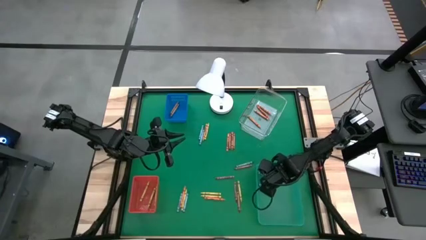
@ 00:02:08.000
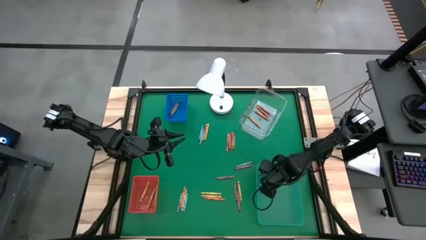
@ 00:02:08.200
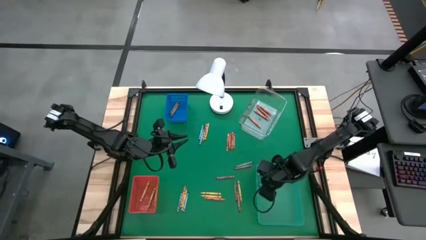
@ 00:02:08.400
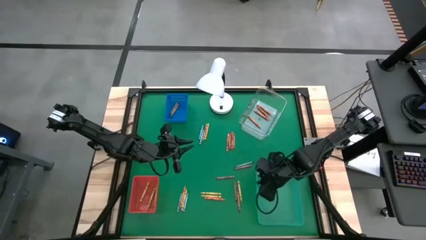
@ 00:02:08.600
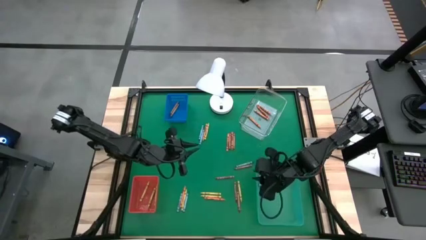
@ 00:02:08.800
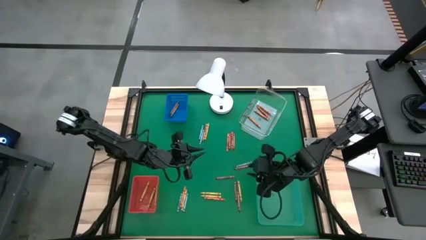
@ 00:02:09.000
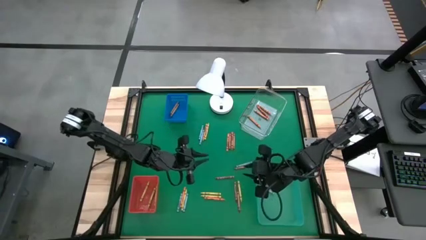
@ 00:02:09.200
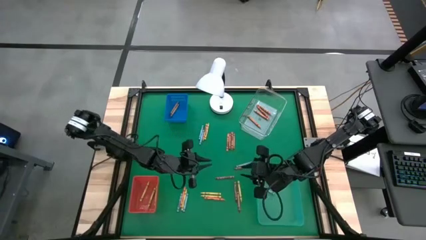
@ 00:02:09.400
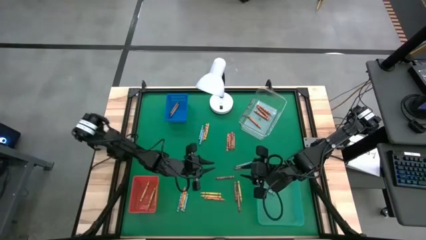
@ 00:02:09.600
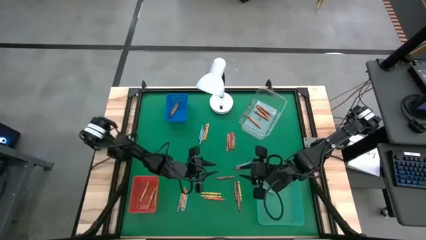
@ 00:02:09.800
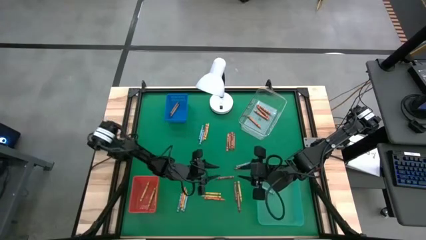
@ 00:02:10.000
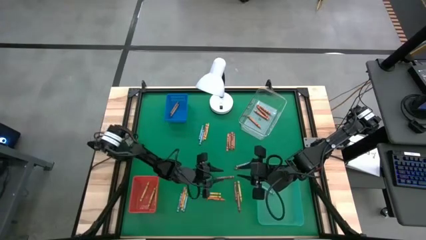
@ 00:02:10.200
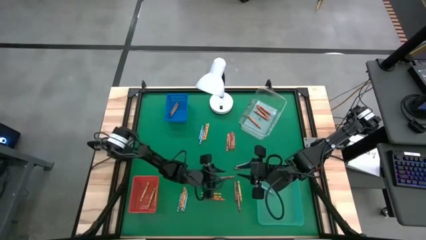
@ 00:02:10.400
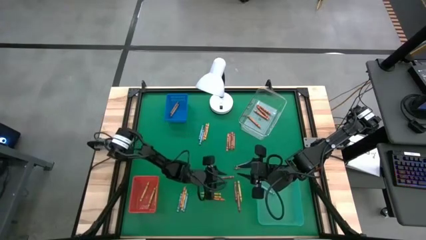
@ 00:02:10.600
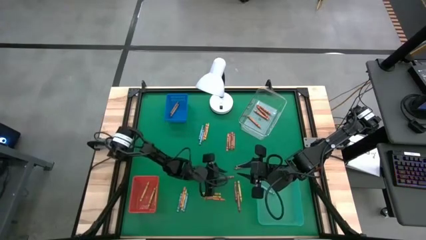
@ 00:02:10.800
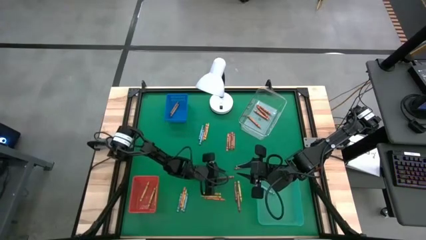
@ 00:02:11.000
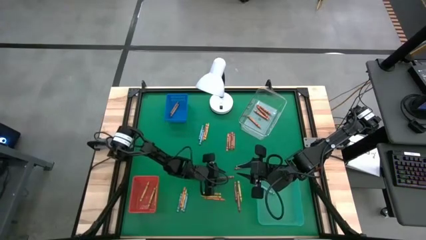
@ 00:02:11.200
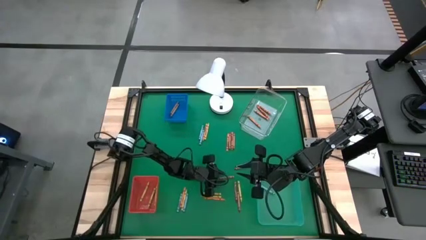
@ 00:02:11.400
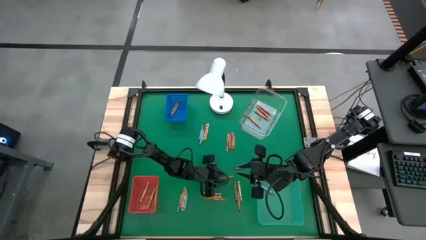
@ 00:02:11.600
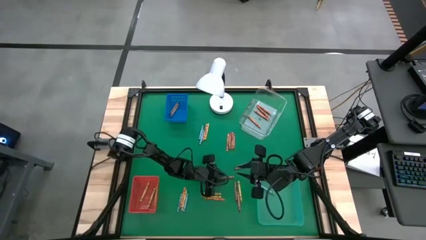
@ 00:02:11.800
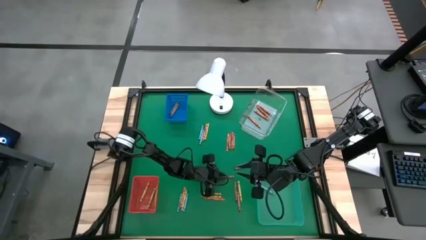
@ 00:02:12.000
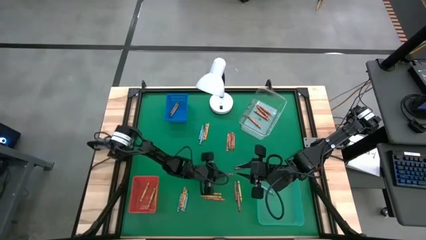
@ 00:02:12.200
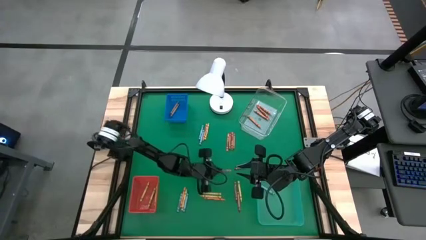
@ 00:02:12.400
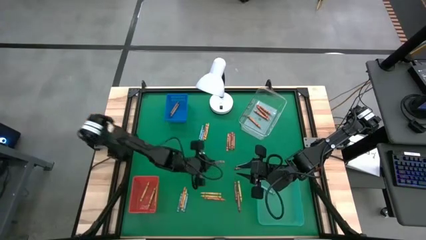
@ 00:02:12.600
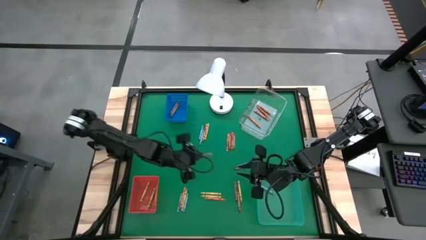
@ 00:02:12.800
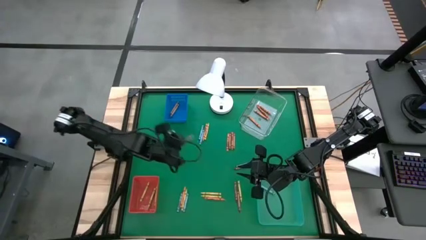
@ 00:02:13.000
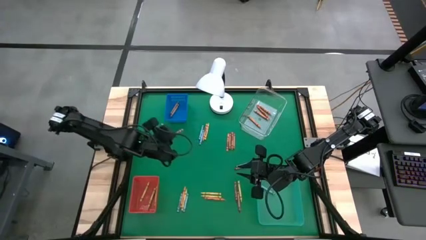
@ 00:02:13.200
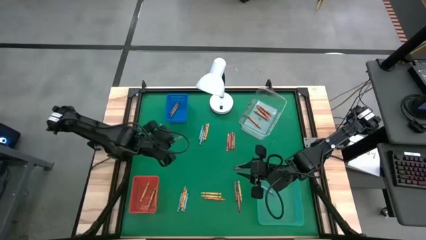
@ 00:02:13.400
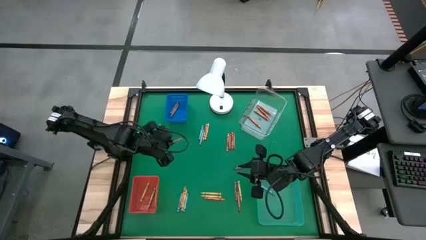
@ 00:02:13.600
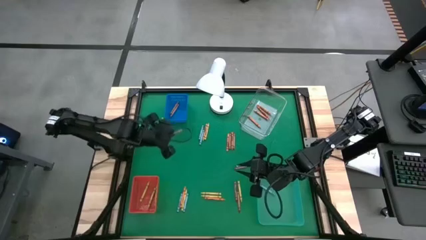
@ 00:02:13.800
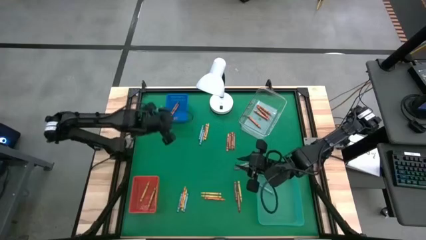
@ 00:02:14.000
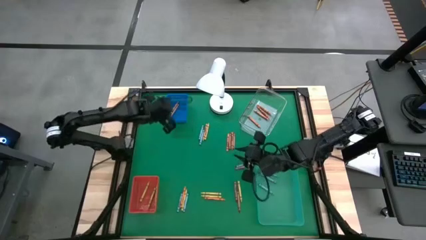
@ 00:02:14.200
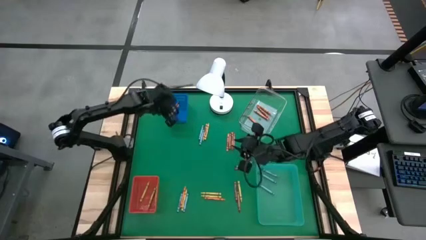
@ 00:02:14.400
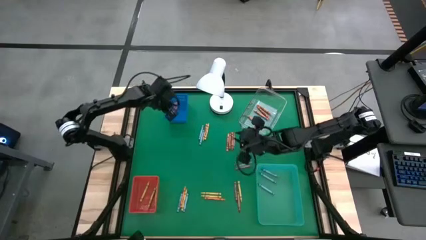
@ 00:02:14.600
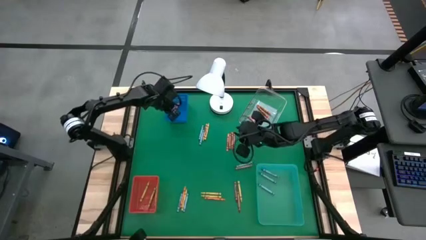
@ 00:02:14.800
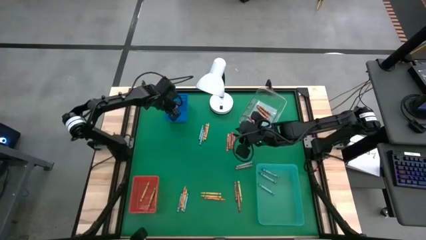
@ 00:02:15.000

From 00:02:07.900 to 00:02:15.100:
Task: Sort crayons
Put the brown crayon into the blue bin

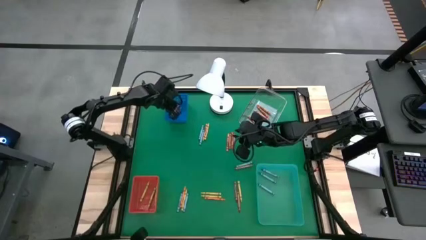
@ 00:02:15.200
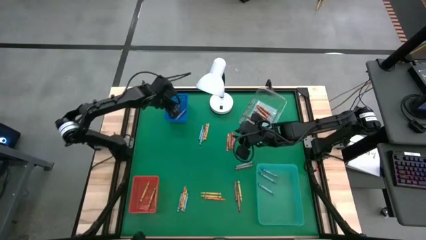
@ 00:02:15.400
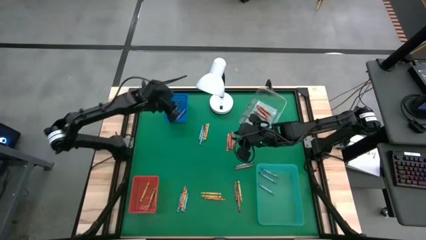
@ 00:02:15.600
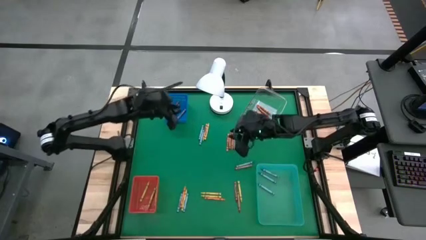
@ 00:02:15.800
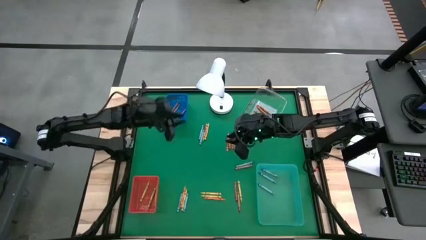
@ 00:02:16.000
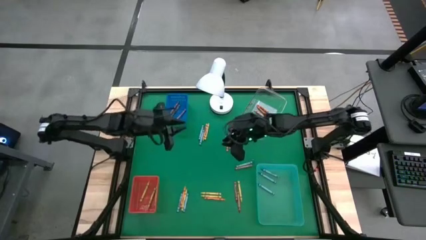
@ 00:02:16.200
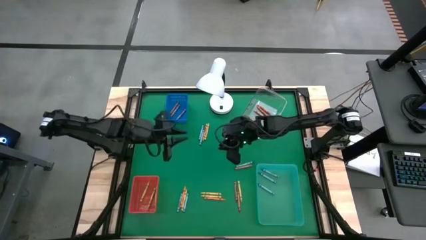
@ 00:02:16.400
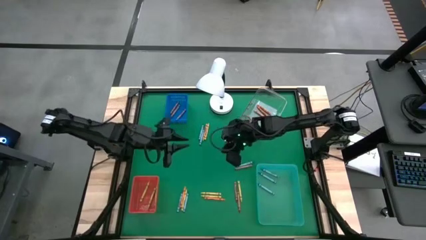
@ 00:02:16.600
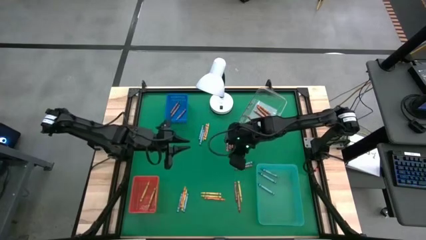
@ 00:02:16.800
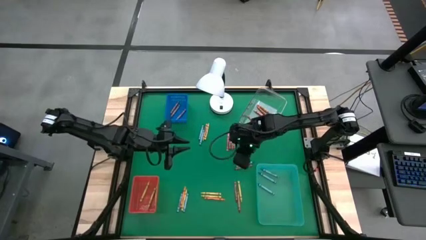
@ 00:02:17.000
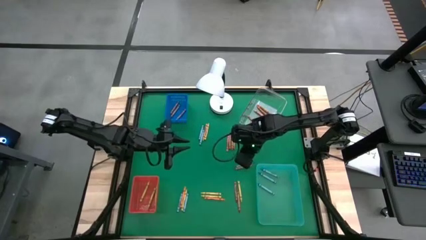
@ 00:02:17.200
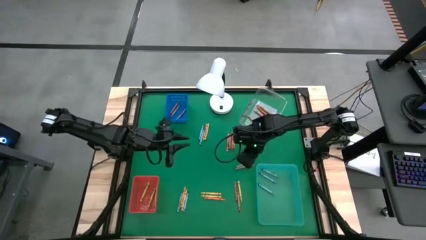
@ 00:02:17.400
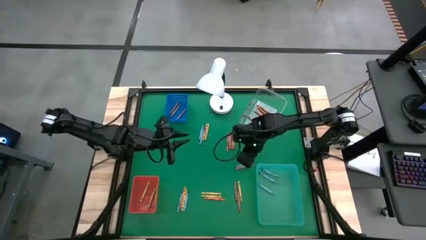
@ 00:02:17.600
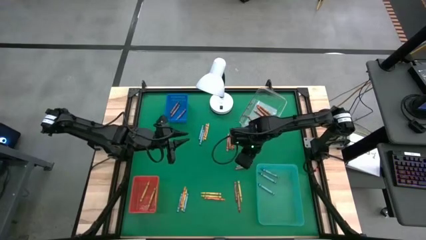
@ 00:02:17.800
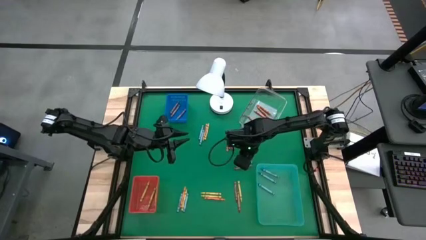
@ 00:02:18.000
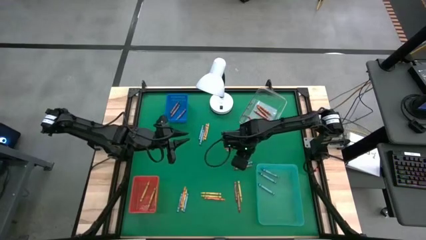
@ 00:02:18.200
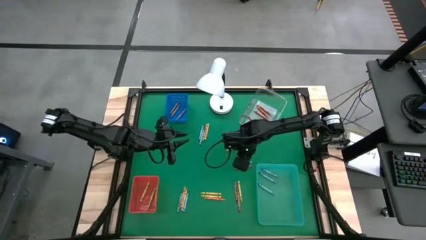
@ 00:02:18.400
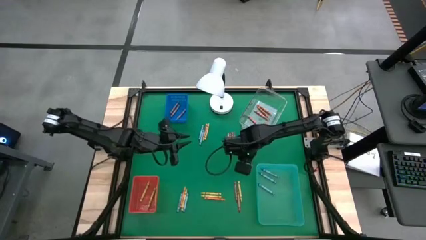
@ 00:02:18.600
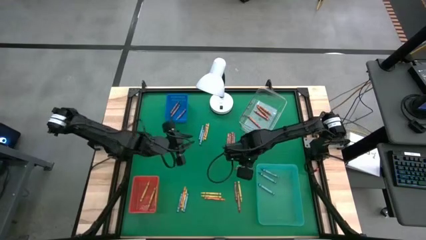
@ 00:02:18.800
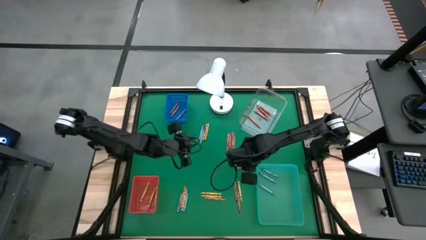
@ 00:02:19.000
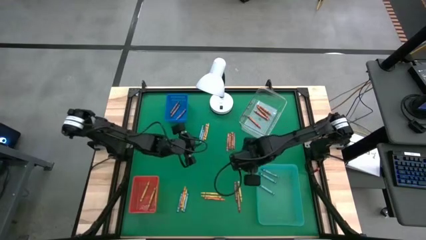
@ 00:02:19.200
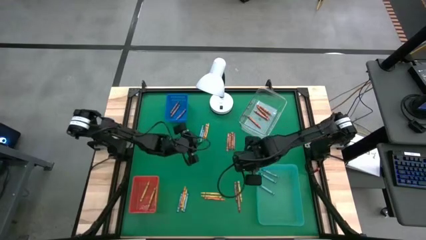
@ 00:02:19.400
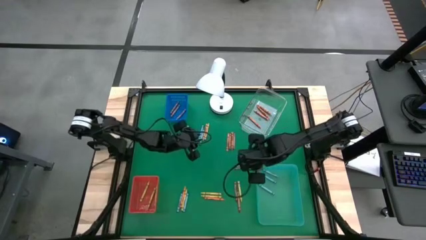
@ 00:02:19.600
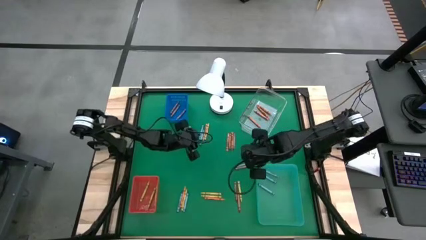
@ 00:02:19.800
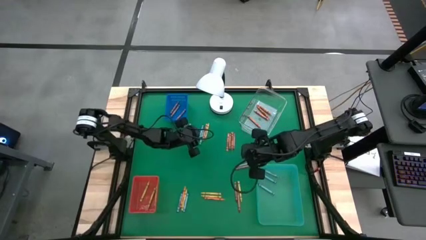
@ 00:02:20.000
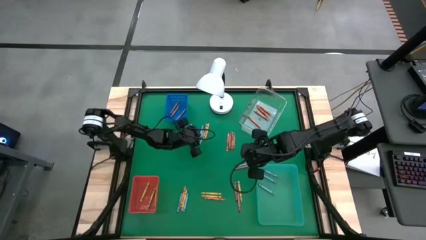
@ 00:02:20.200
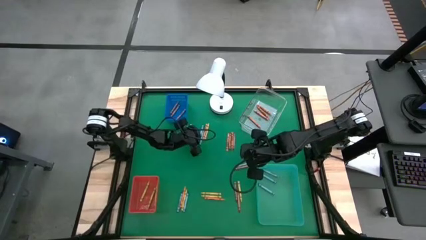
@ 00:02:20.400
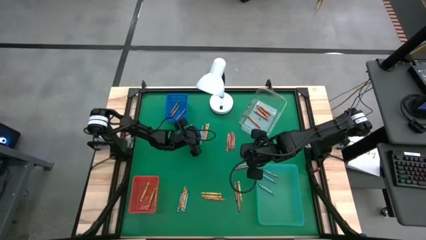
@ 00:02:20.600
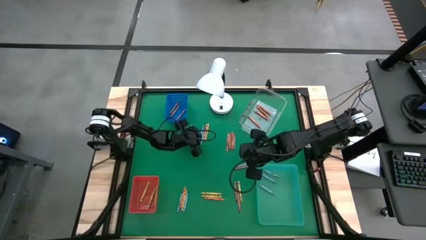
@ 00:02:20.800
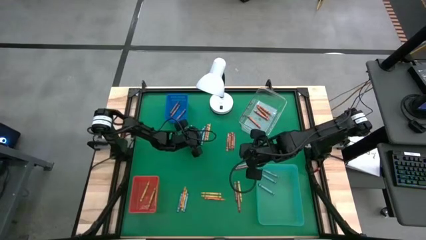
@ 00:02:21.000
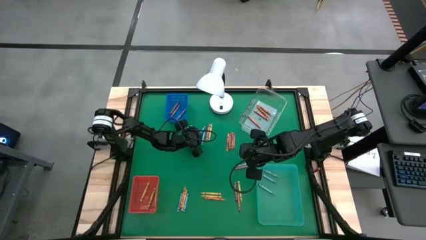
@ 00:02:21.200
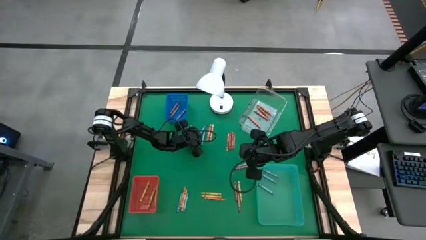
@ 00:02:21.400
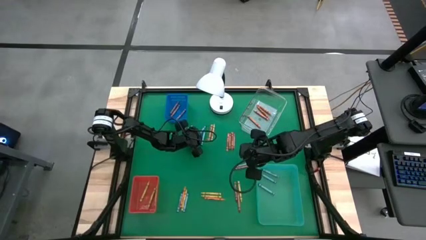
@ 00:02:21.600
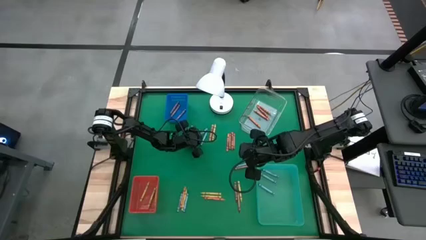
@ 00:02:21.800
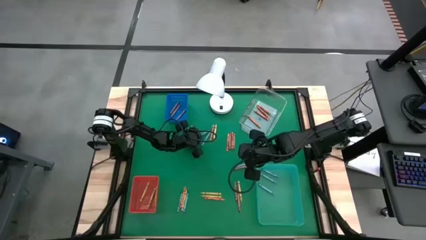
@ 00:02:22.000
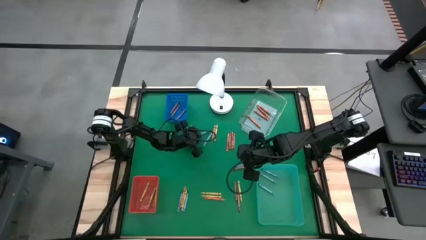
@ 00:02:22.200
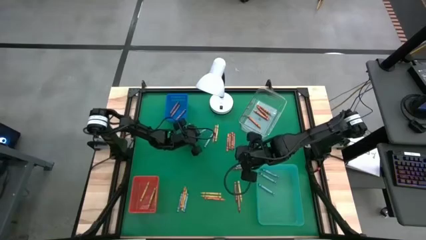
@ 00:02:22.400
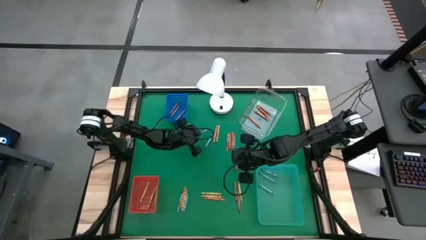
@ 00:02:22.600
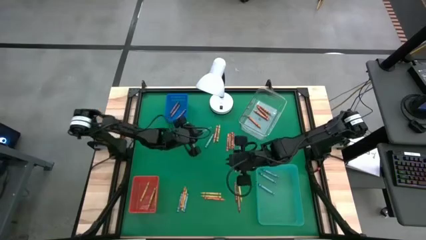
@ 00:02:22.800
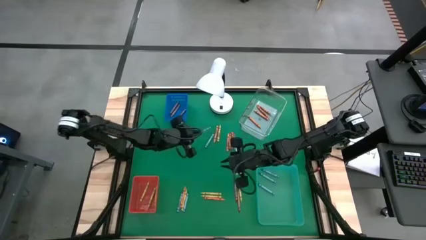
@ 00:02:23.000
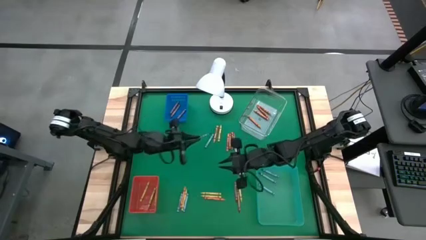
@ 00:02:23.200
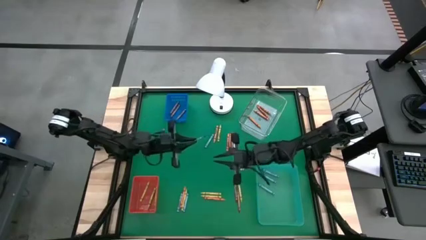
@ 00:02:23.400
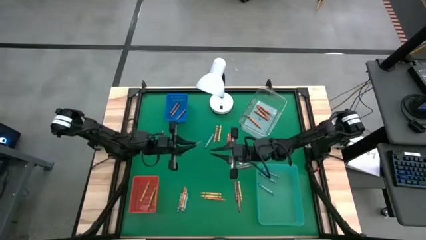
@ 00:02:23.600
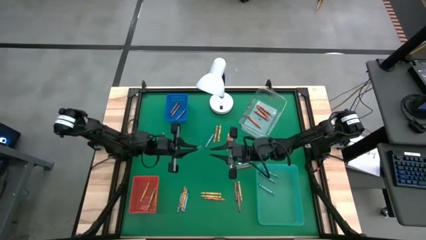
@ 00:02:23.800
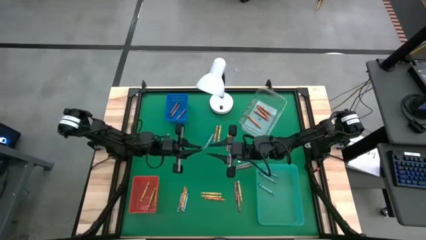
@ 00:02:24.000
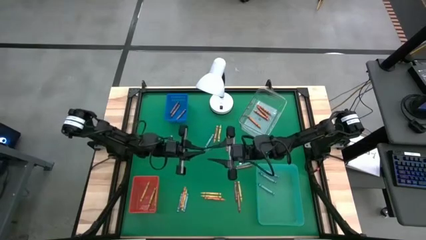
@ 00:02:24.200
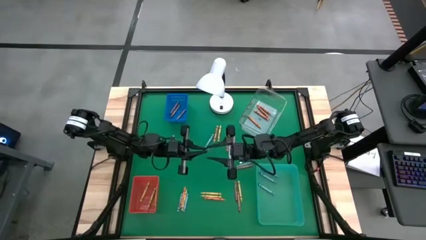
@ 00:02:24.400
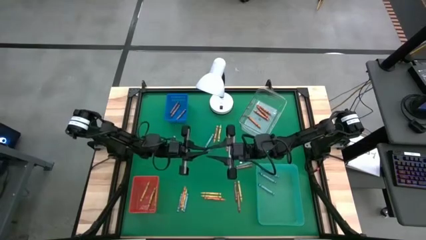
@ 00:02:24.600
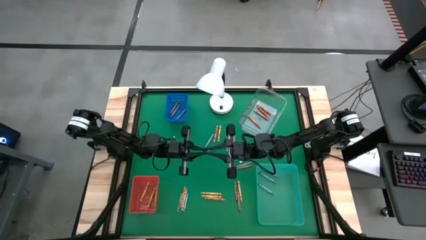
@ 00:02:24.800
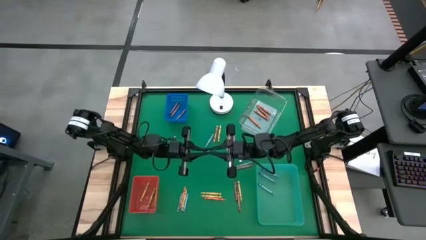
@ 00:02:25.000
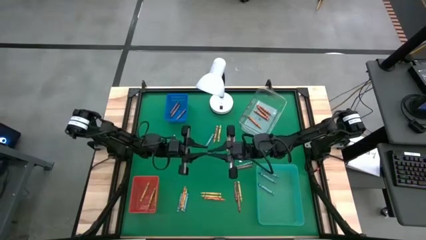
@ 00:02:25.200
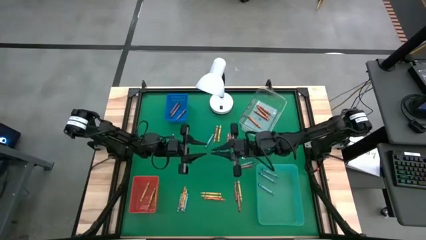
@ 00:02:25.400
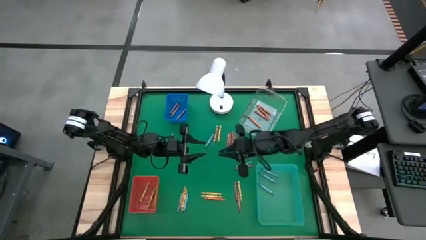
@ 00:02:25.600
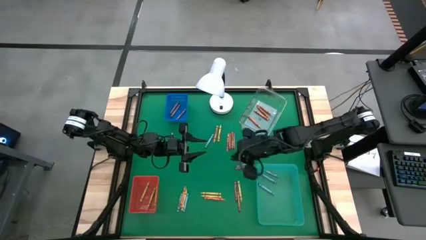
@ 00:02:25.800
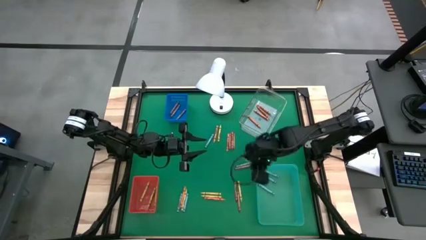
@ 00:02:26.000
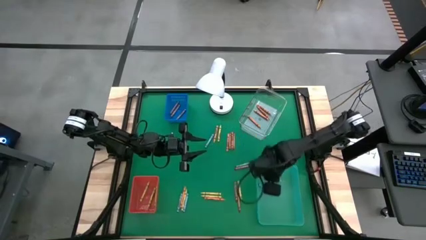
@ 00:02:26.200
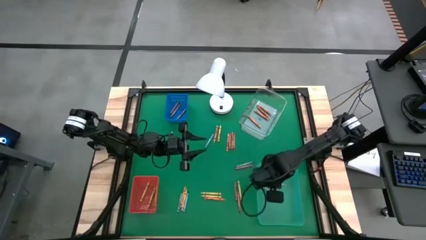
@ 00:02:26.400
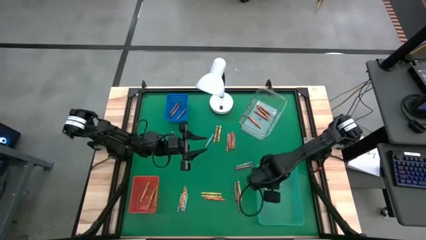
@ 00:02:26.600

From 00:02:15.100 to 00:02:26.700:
Put the blue crayon into the green bin
